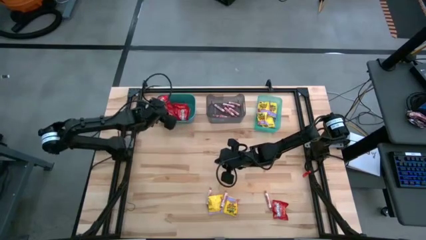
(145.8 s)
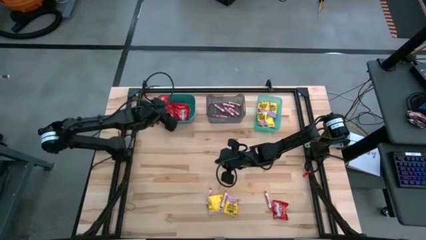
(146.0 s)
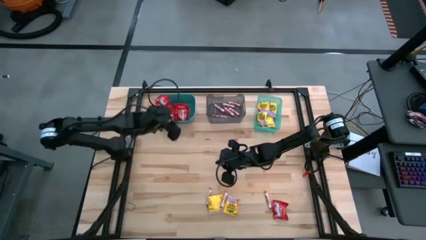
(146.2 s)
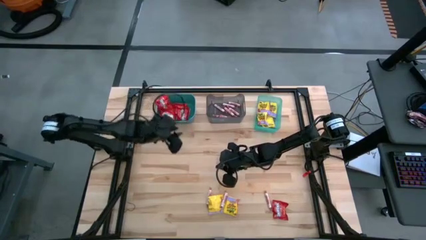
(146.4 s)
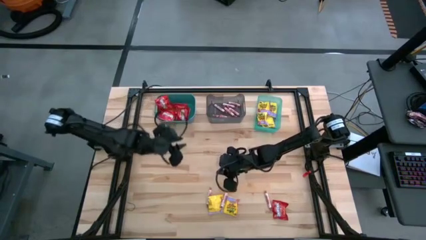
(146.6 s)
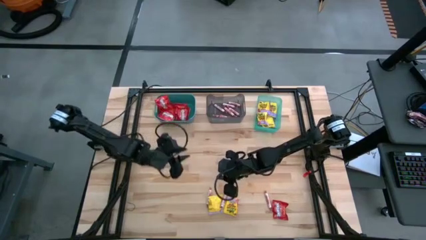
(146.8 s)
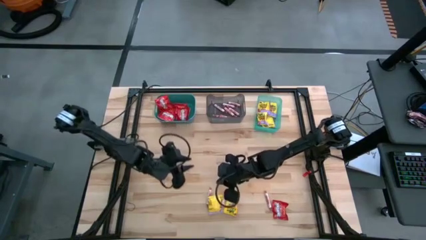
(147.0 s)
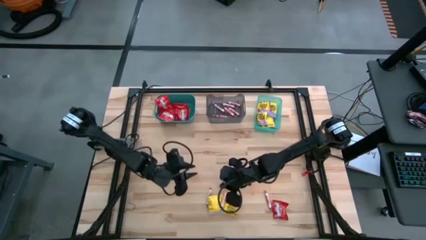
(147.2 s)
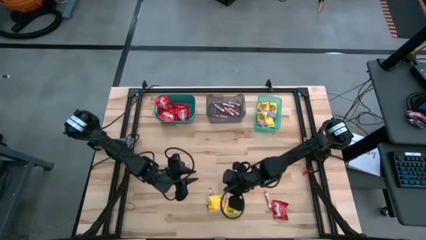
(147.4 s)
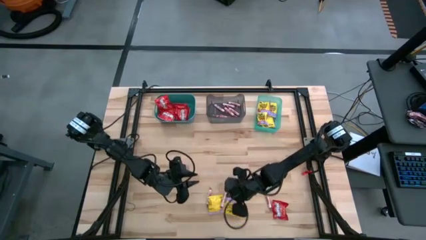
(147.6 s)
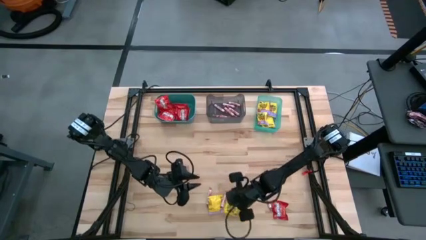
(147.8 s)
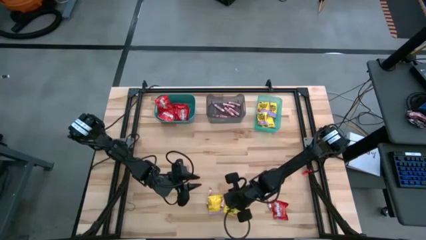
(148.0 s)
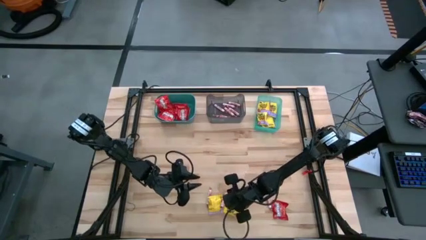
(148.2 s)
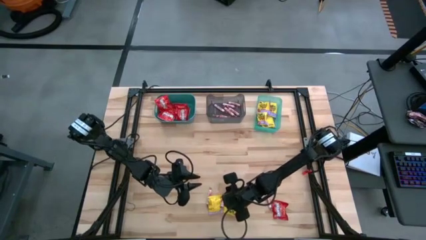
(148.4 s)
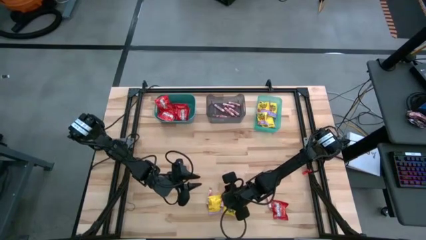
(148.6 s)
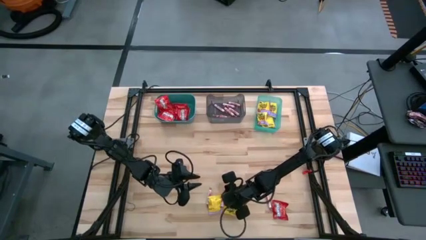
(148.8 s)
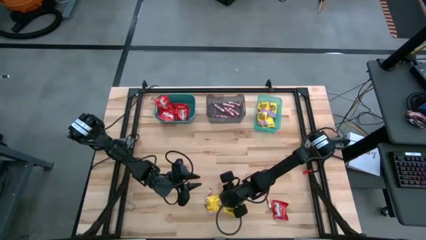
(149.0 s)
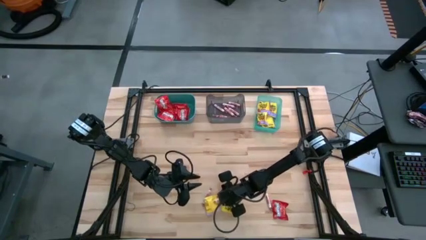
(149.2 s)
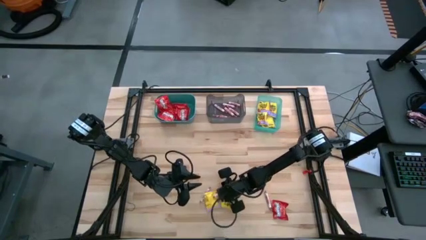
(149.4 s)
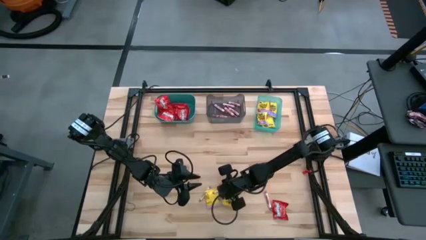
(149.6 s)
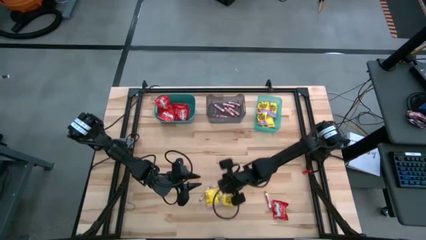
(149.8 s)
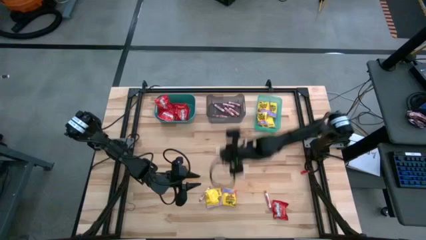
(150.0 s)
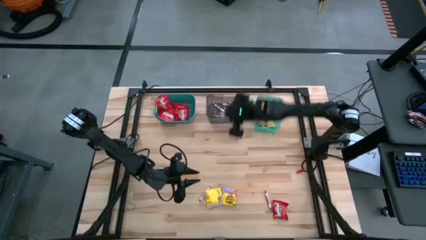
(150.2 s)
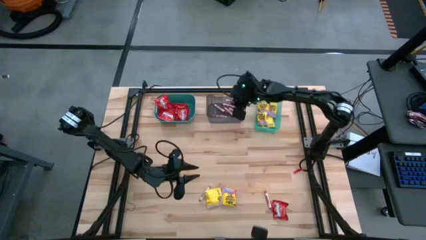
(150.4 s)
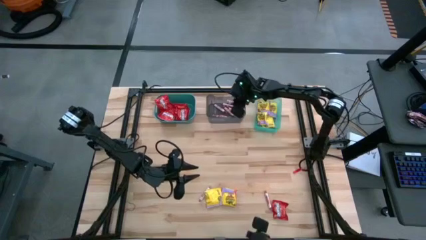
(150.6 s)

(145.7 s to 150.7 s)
Task: Sort candy
Put the white candy into the black bin

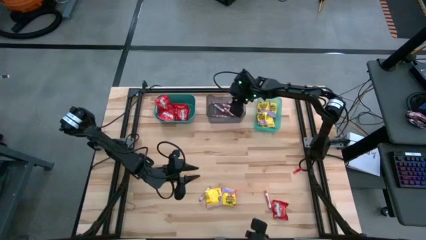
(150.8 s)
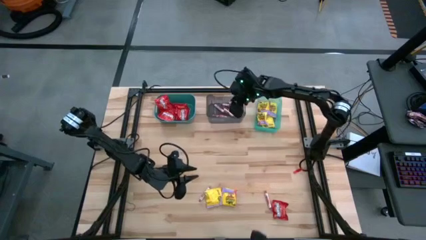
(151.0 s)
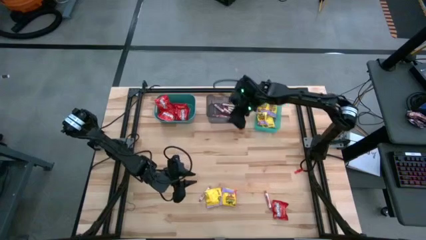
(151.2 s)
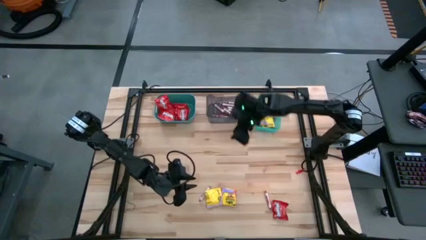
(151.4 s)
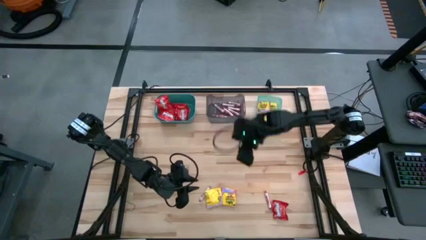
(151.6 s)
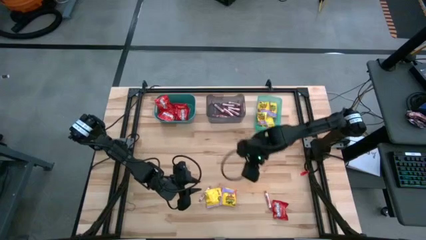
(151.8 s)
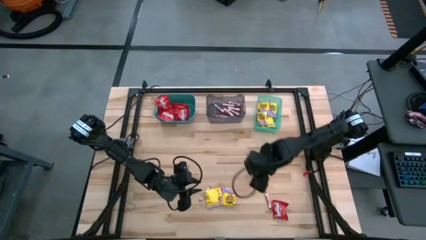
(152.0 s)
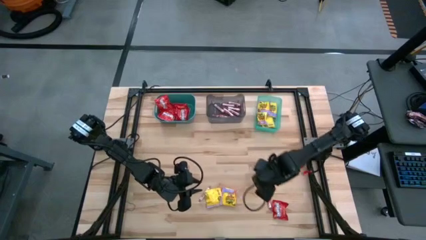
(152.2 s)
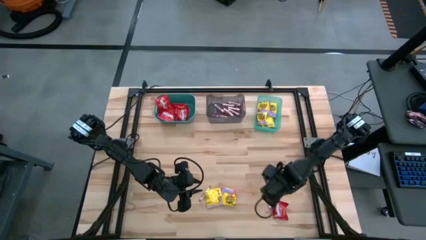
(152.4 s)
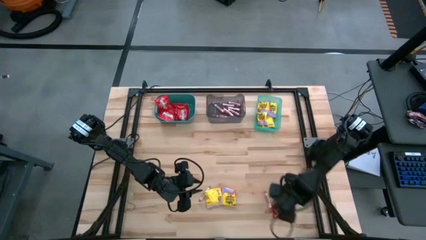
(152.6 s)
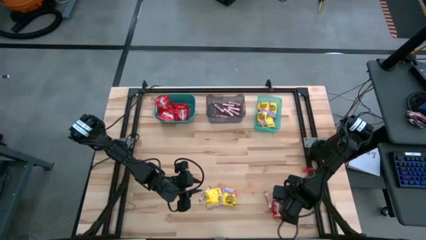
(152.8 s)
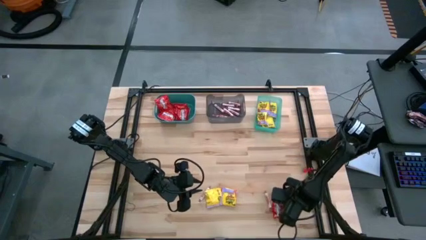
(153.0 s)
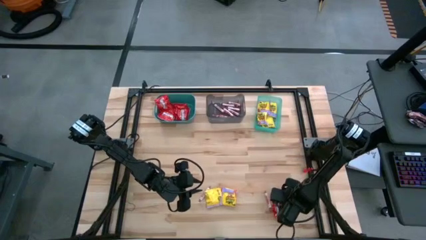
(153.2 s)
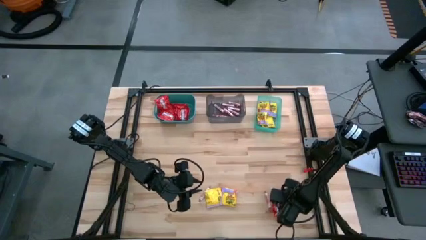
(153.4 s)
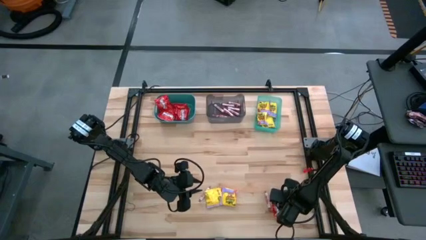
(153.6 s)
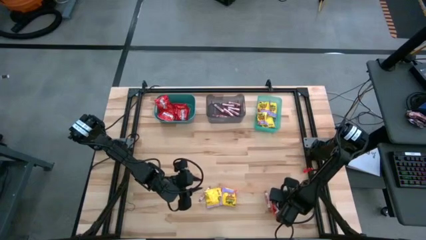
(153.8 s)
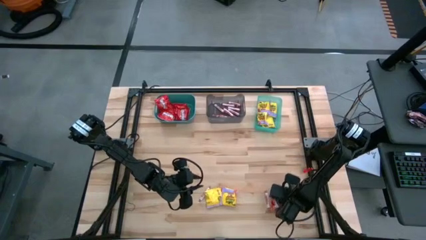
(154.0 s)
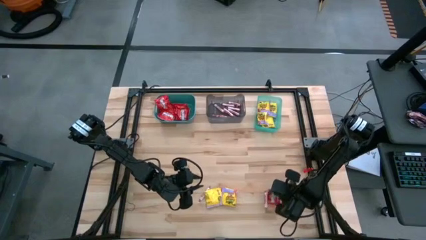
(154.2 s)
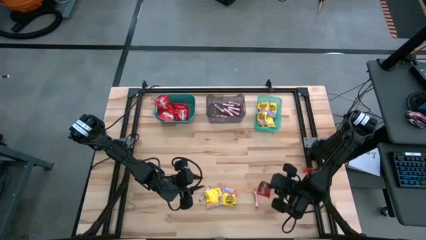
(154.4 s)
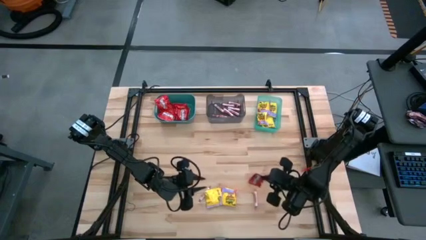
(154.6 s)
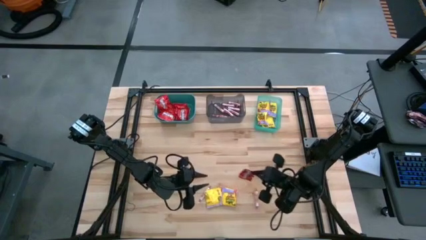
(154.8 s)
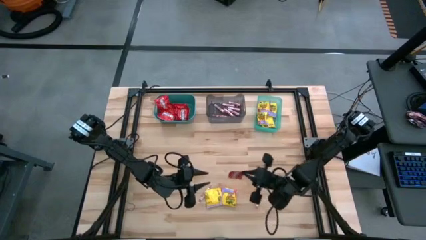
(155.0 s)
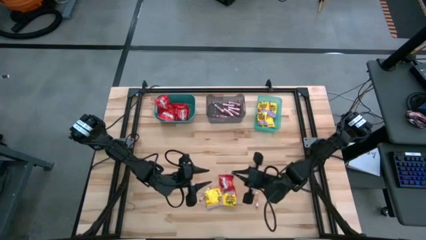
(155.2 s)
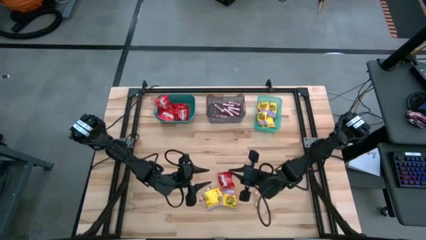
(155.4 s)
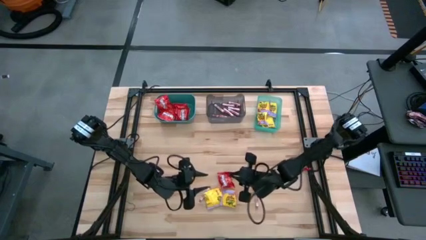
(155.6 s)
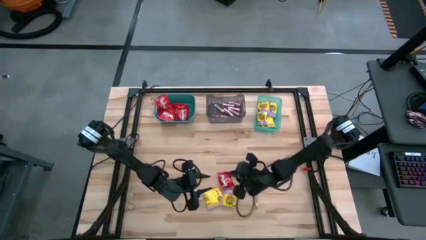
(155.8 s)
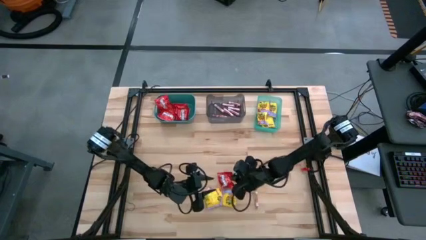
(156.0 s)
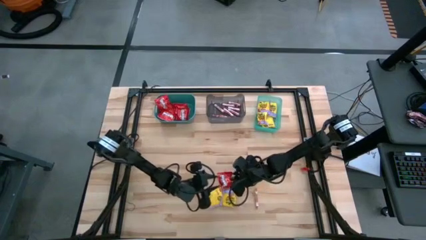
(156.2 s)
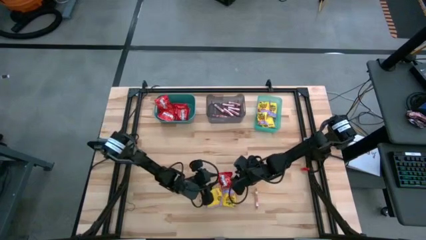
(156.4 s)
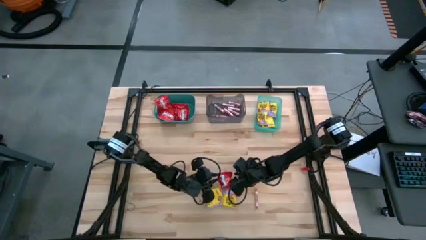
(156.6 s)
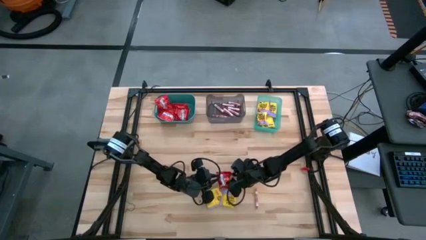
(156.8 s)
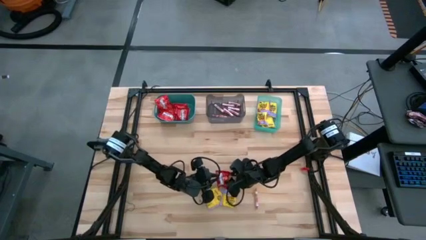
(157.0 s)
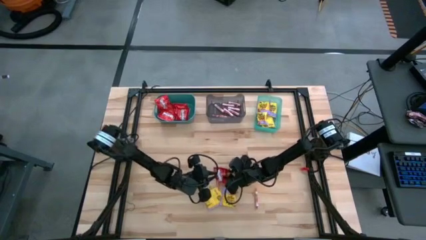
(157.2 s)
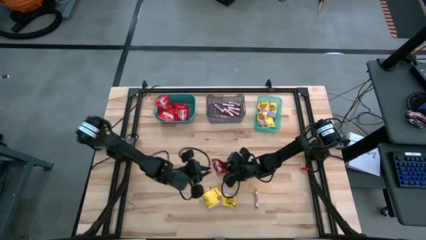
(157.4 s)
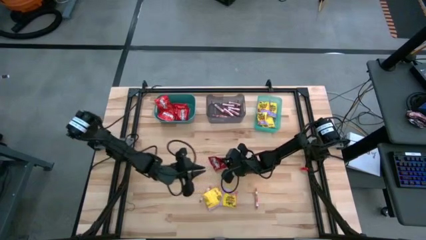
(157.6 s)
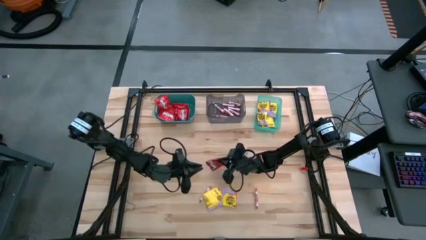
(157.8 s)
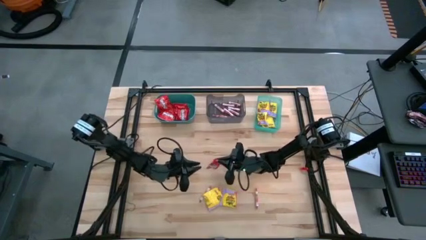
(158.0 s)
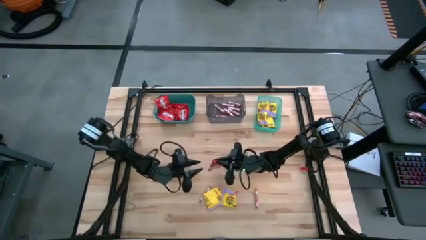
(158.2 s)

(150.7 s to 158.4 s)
Put the red candy into the green bin

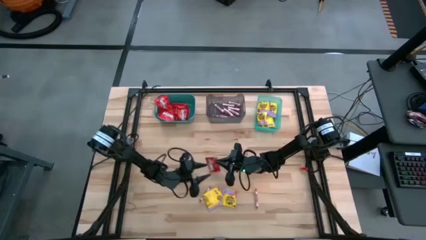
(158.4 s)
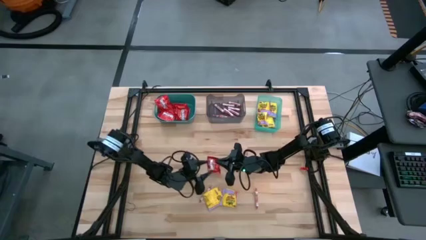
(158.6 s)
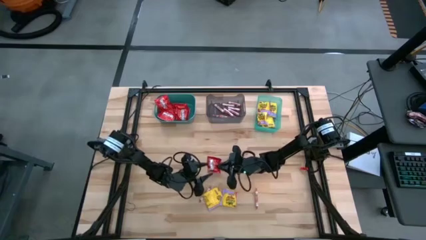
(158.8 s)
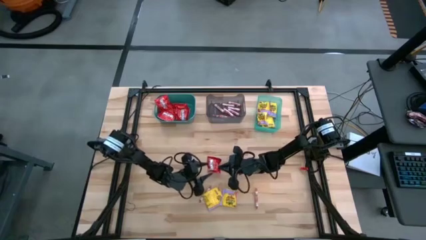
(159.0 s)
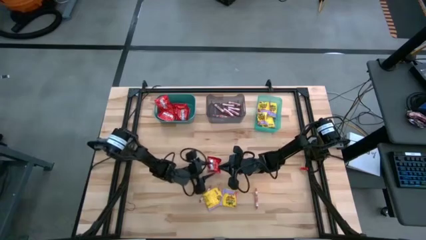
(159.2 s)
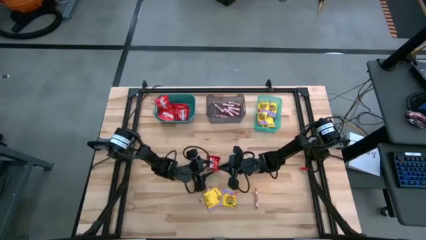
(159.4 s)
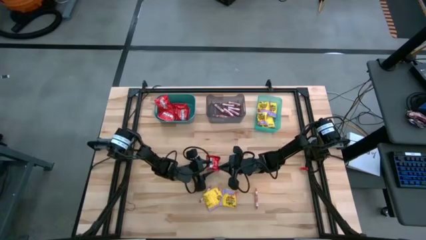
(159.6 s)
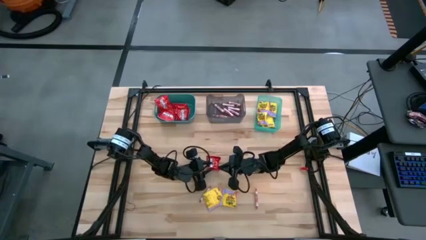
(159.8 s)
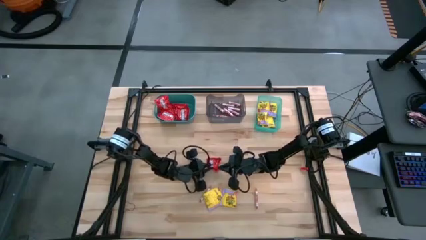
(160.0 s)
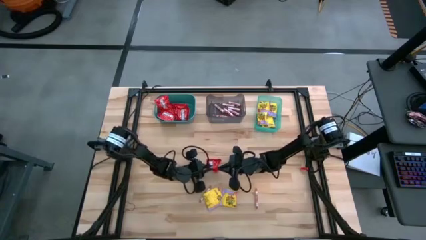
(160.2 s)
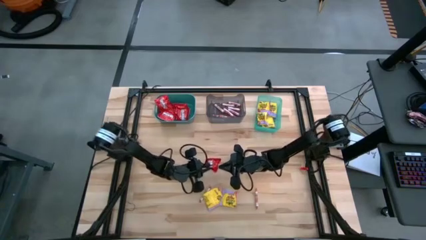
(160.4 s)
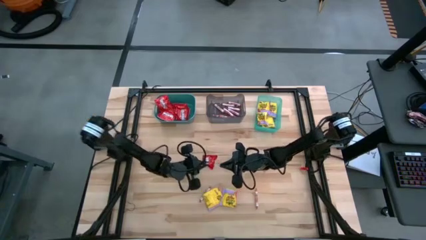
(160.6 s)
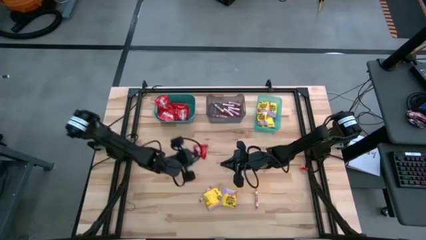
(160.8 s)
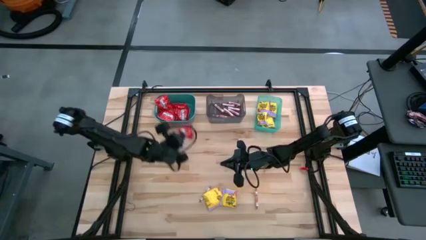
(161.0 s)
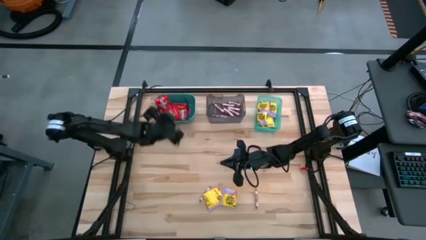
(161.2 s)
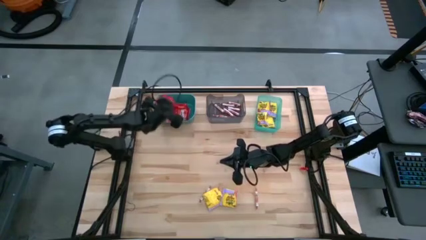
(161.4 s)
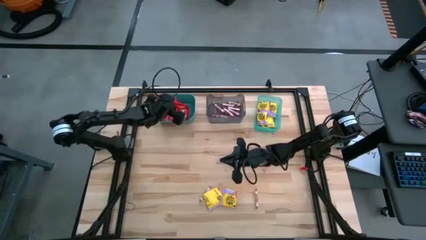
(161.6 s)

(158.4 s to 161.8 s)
Put the red candy into the green bin

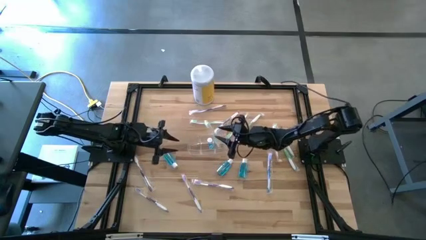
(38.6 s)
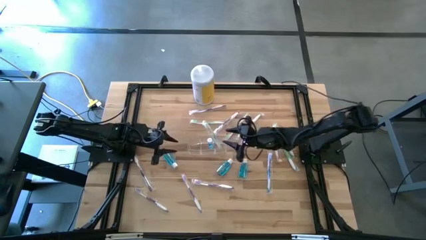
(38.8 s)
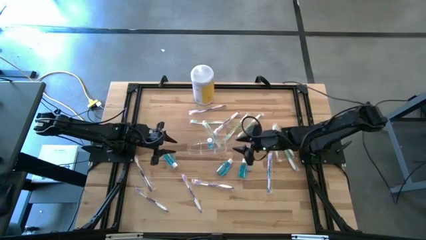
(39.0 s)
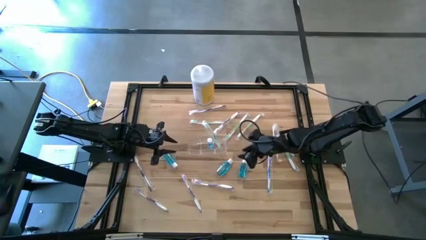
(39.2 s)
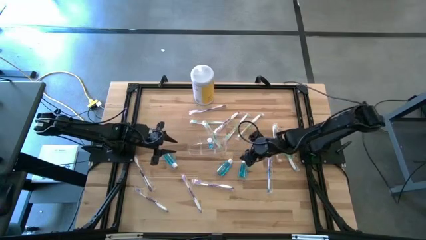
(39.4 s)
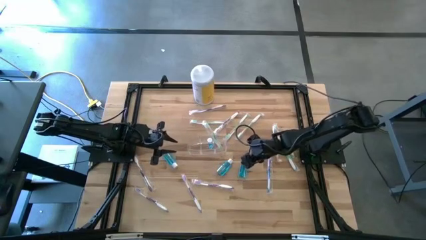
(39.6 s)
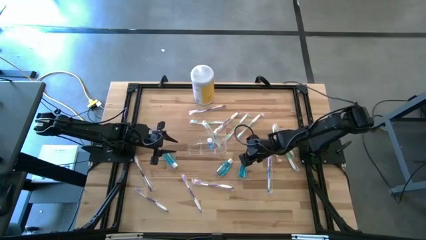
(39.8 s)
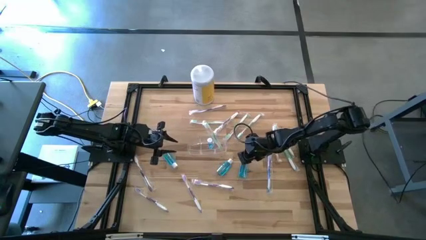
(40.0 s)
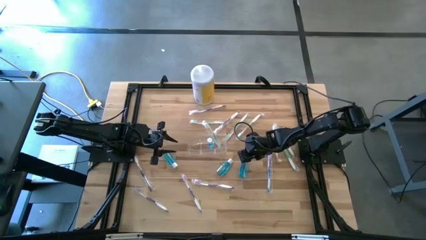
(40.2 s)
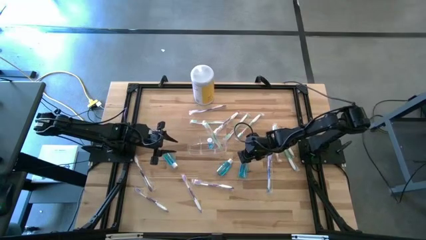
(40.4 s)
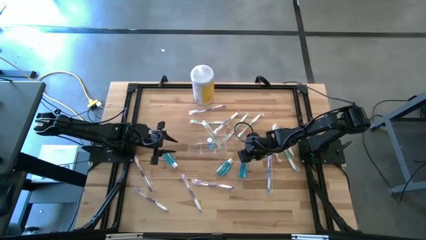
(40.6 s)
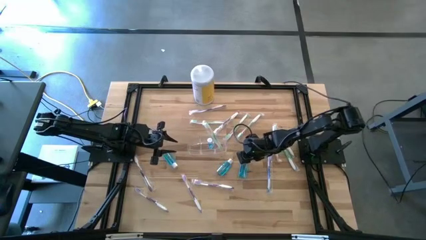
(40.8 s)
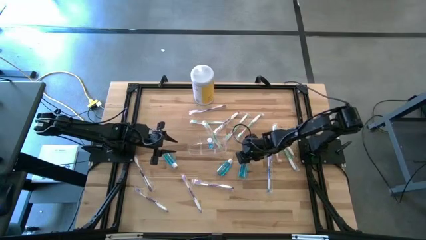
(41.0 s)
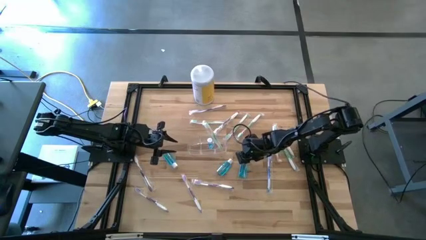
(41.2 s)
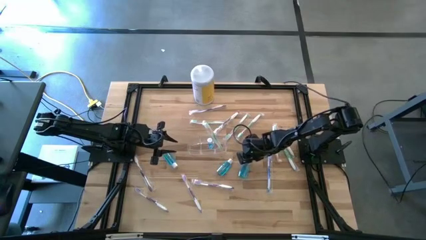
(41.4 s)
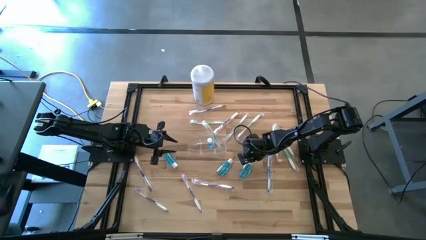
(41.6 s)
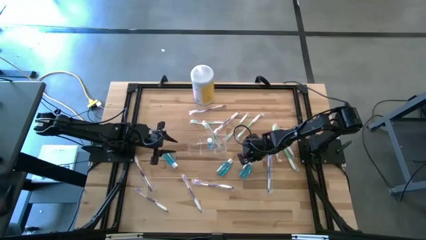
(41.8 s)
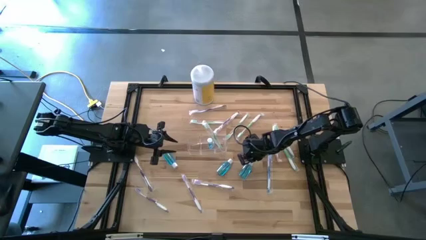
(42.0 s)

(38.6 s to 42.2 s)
Task: Pick & Place toothbrushing station
Put the mouthwash bottle into the transparent organizer
